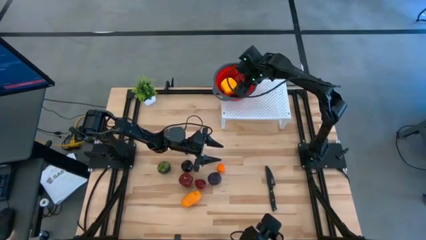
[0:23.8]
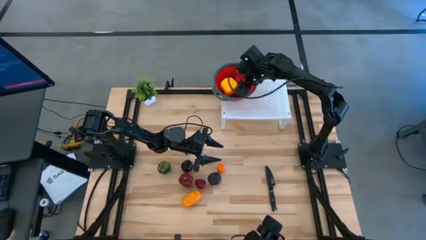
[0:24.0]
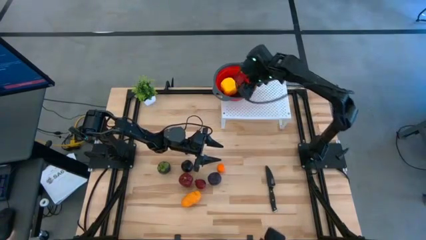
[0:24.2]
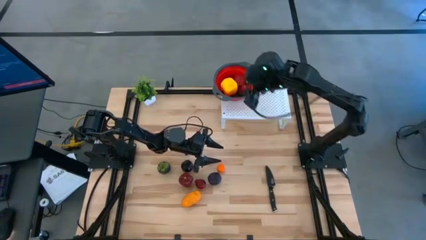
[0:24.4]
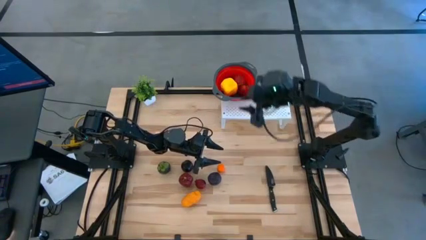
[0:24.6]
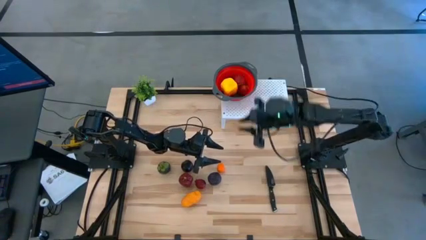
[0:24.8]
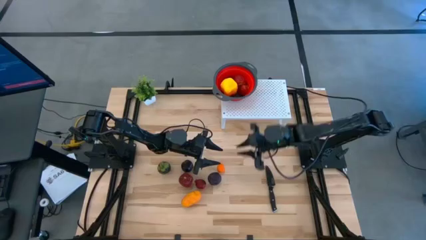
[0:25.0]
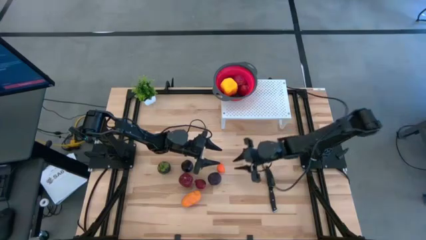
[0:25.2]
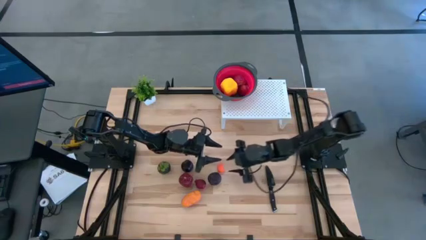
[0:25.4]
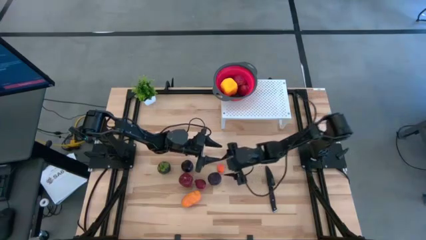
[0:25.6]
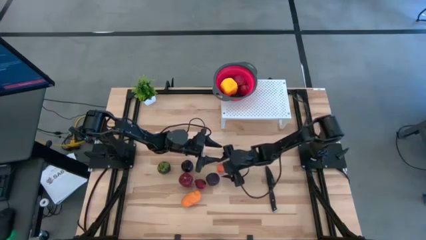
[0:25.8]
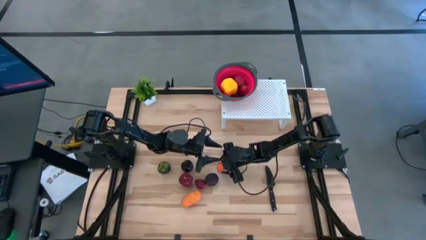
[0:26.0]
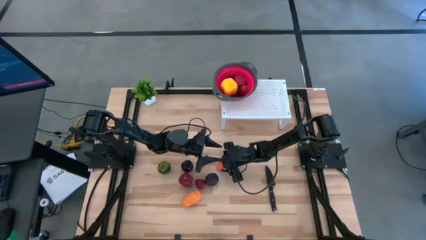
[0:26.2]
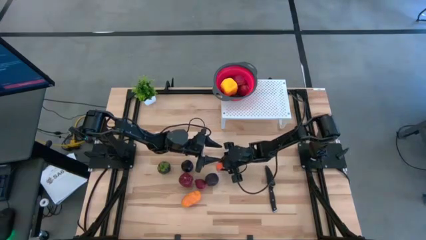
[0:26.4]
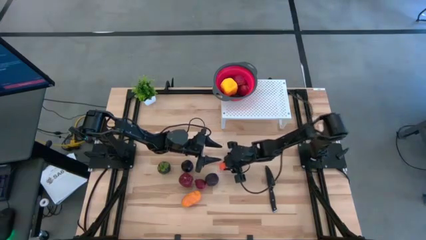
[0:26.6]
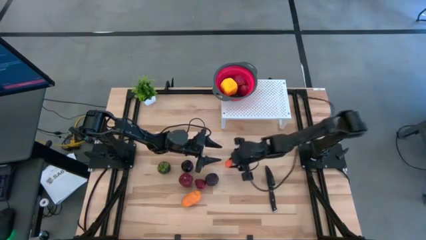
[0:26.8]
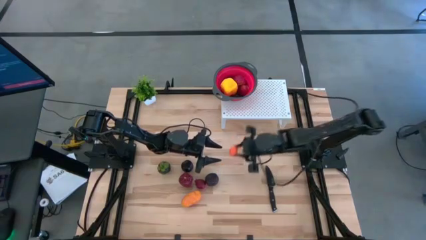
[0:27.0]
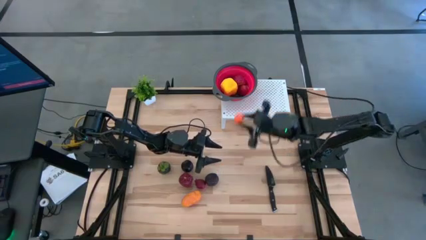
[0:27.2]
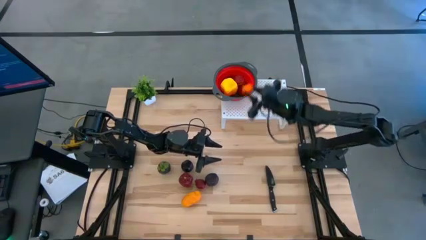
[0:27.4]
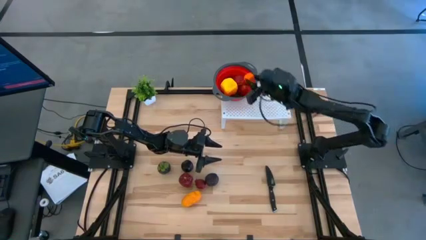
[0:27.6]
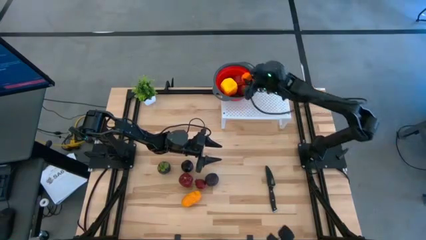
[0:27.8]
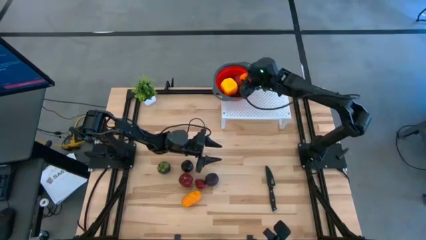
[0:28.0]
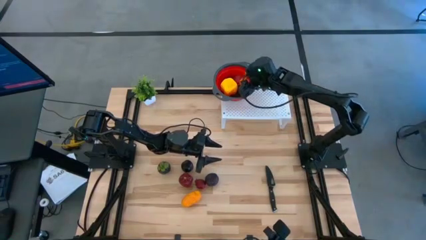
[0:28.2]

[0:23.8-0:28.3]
Task: Pick & Place Fruit
Put the orange into the strainer bowl

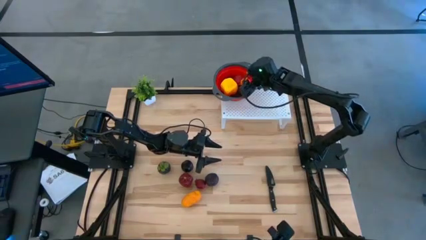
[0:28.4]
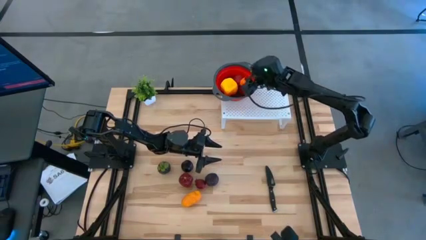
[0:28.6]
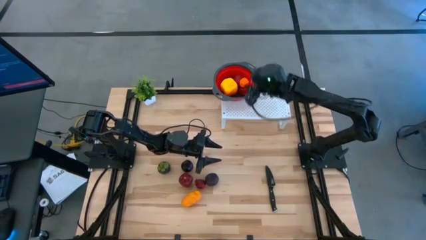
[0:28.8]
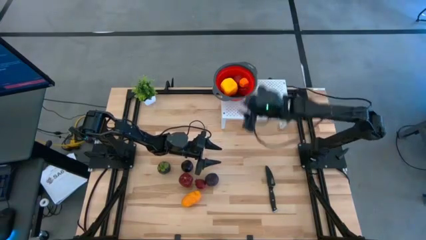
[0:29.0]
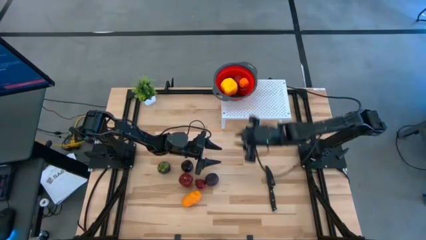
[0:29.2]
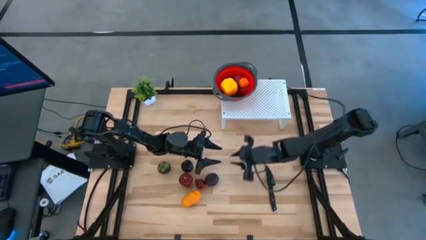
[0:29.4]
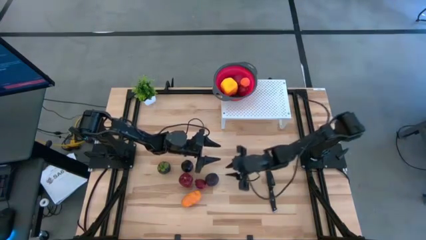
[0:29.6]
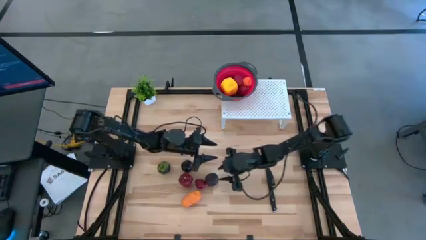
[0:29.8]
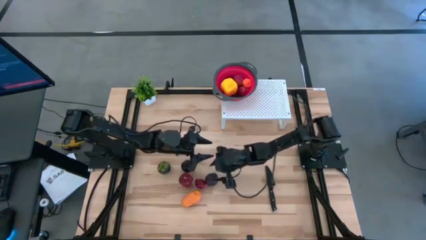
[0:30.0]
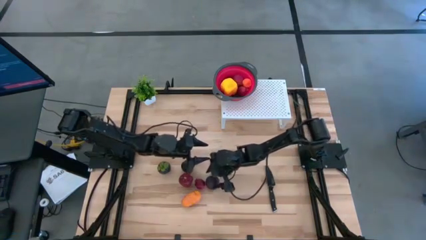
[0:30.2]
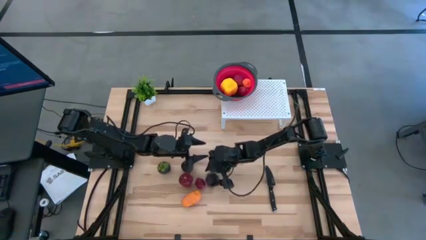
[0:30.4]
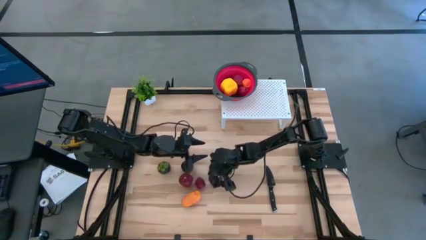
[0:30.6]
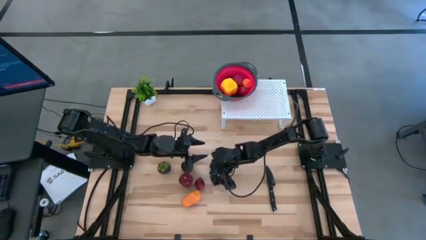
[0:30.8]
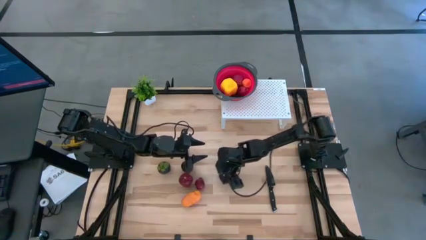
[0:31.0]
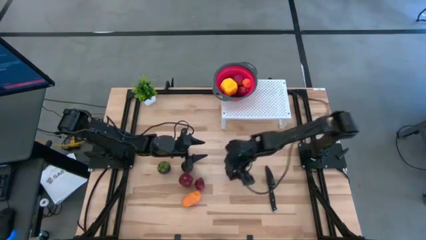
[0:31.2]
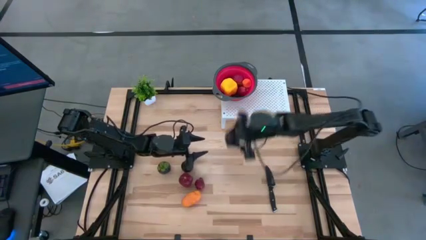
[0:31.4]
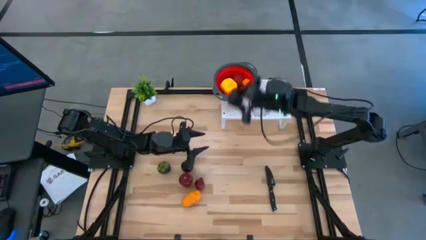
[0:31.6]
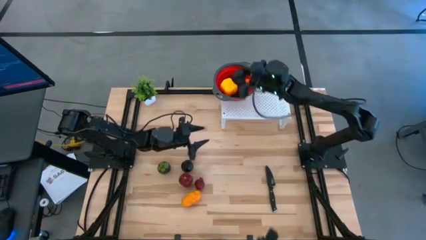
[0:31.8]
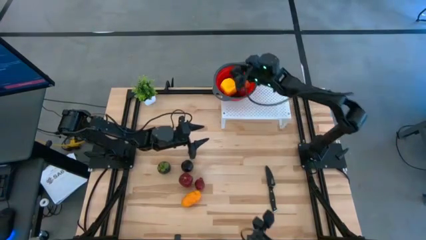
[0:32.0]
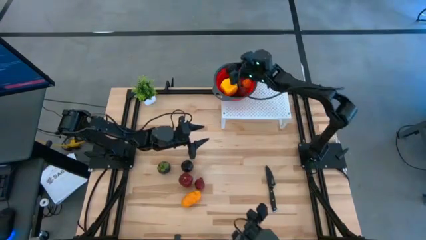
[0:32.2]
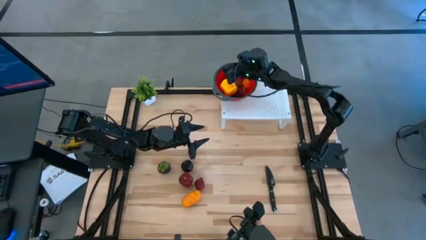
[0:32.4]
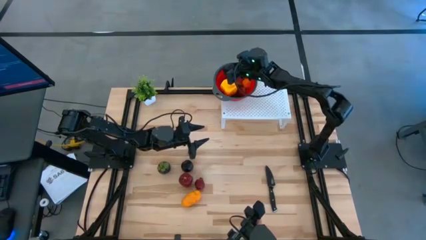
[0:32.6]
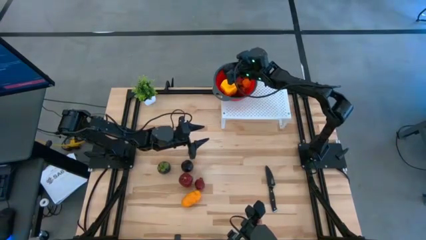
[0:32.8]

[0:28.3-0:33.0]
Put the plum into the red strainer bowl

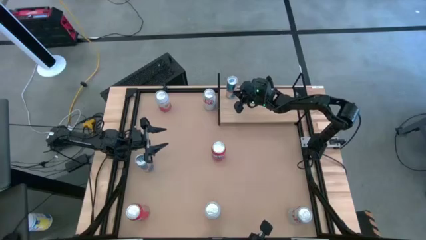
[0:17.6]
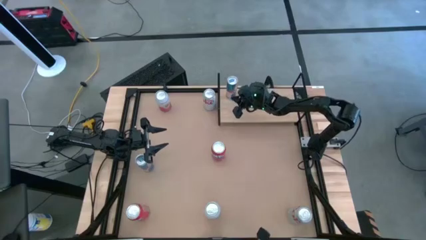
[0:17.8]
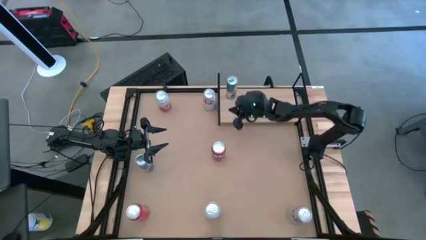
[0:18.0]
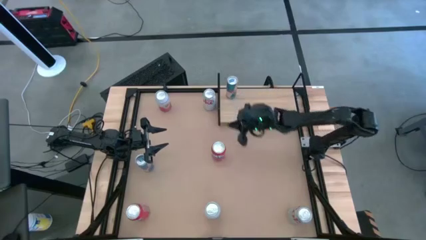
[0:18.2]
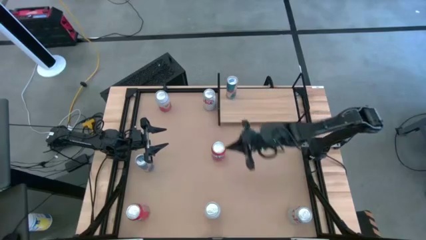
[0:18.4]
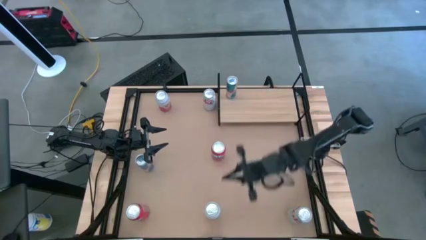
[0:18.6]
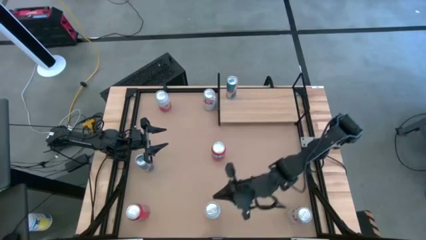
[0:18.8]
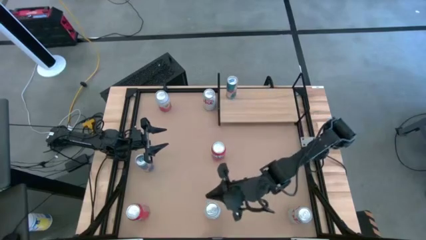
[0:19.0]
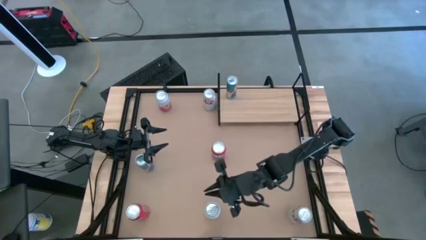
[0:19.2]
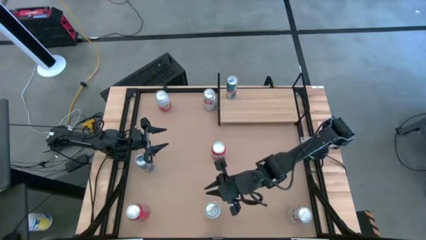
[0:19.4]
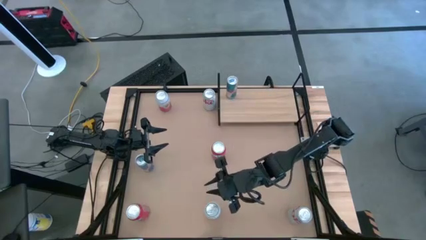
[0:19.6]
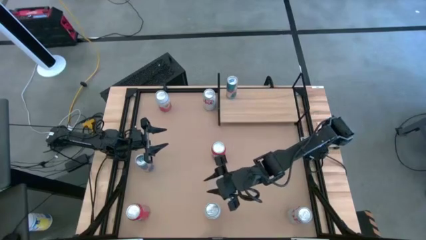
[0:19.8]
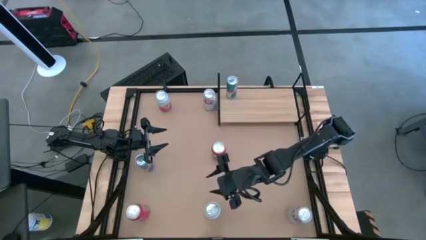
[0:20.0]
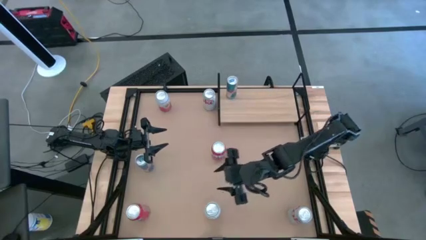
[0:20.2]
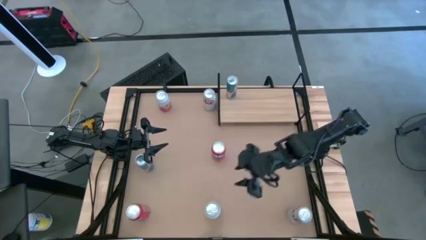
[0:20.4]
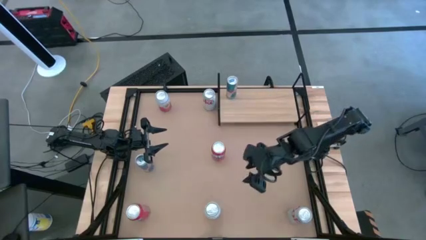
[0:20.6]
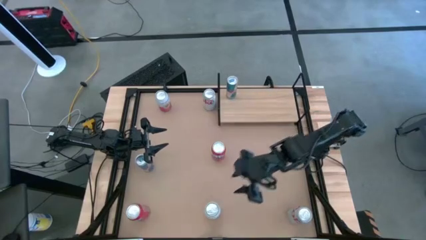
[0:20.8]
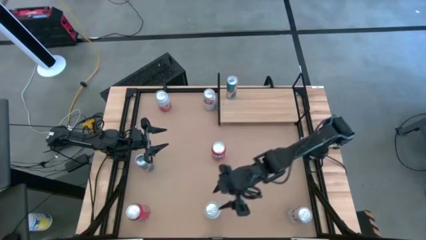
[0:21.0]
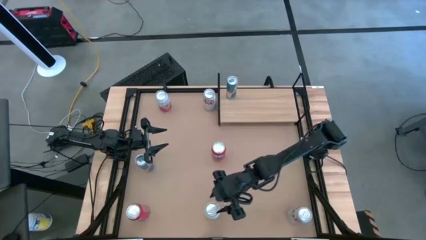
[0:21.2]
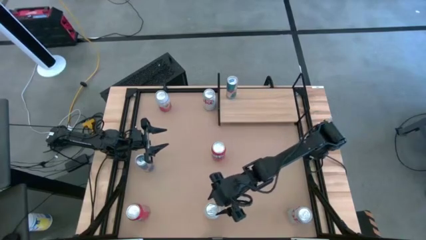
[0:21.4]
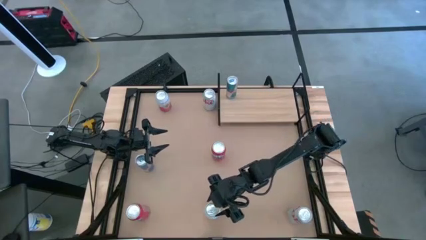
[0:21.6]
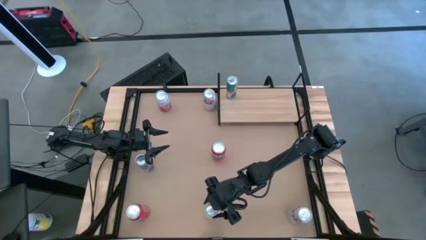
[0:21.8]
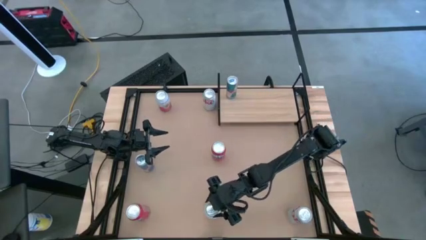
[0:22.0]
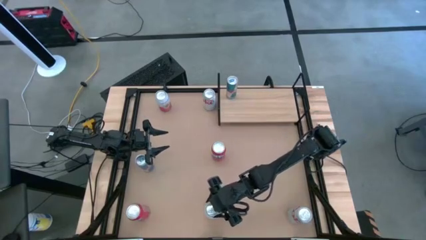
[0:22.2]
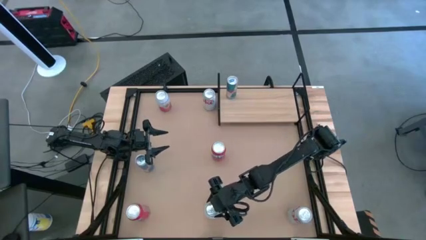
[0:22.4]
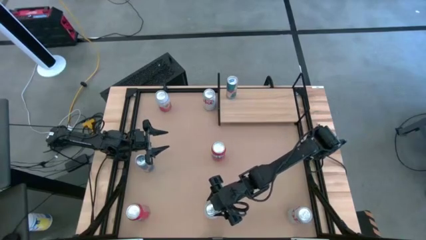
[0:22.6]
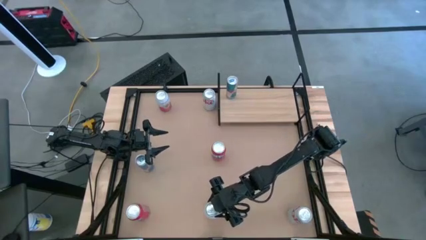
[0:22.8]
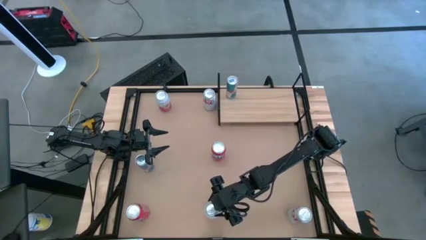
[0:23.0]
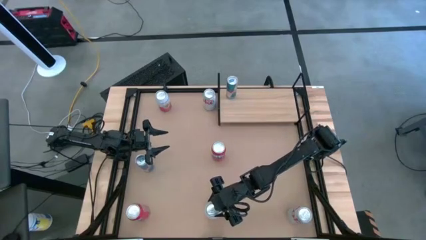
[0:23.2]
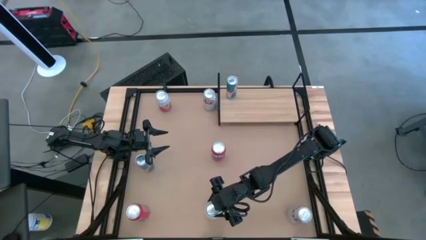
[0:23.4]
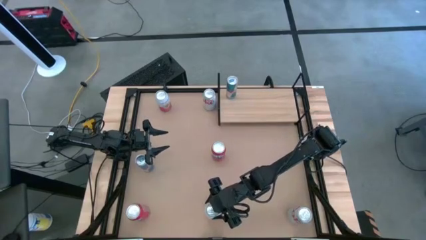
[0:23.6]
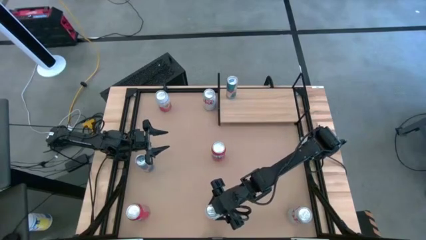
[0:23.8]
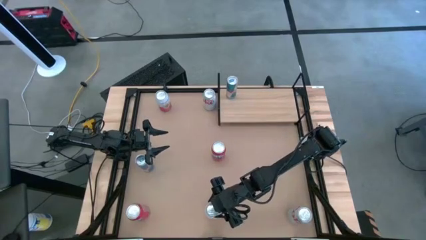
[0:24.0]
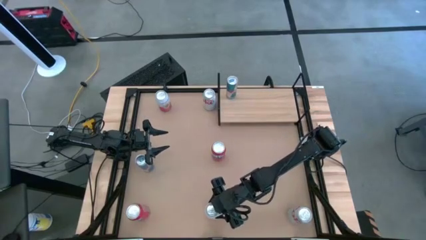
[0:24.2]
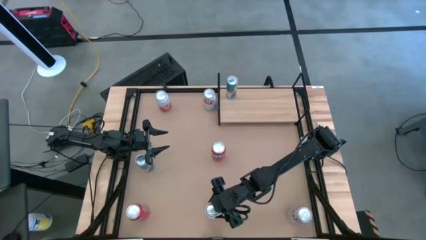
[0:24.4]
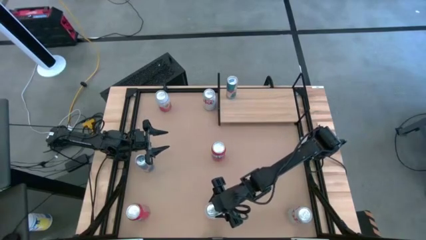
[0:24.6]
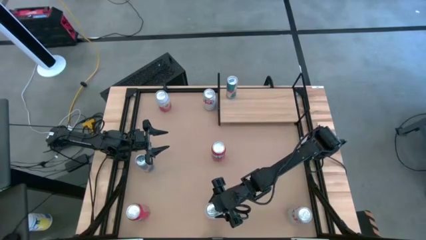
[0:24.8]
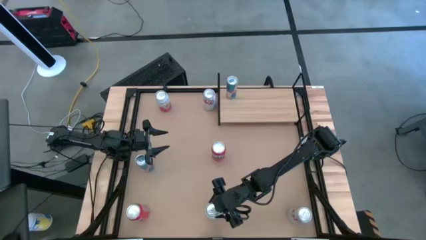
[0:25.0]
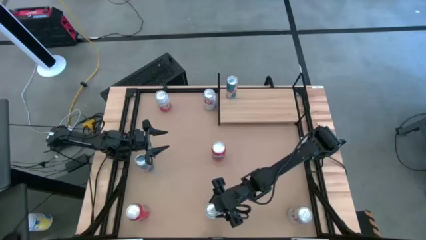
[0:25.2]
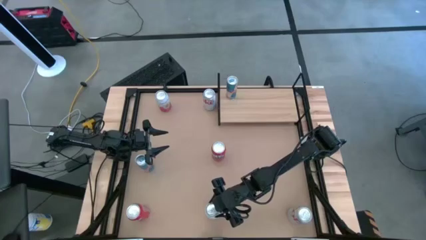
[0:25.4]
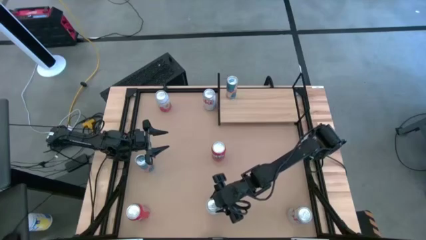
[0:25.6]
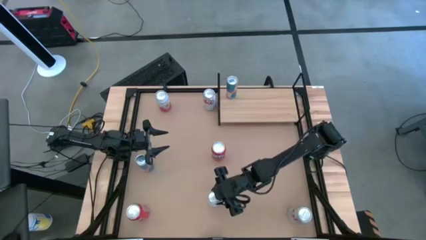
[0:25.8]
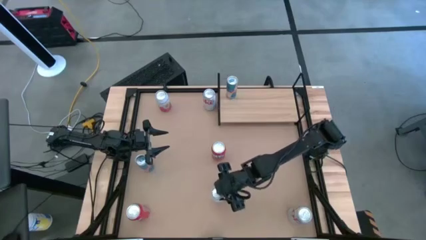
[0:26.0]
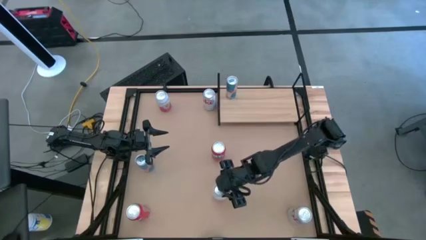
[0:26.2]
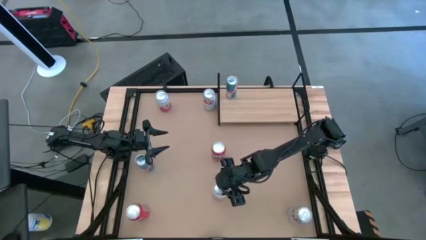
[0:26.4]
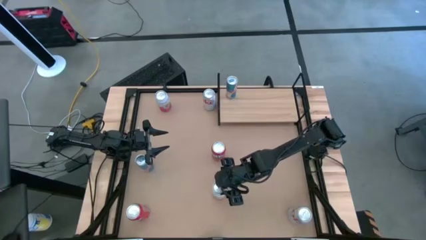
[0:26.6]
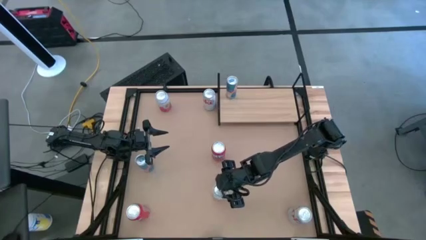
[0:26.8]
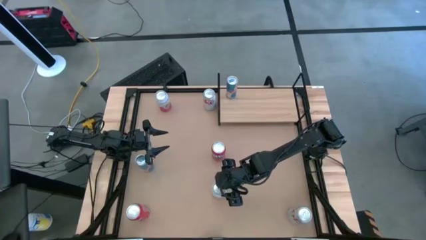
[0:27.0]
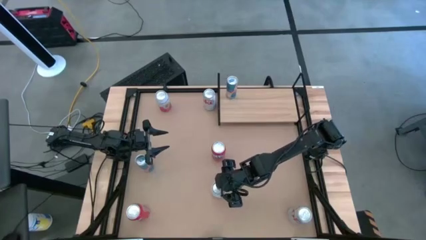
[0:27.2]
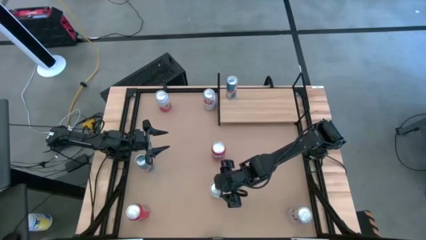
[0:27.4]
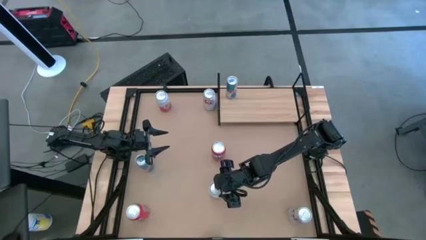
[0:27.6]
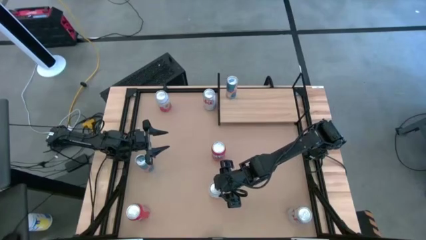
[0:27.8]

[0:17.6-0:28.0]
Task: Place canned beverage on shelf
Put the bottom pink-white soda can on the shelf
